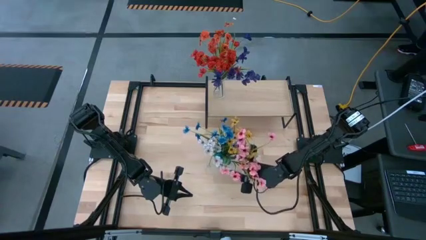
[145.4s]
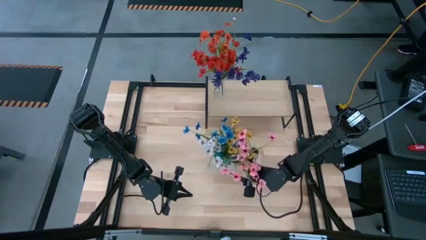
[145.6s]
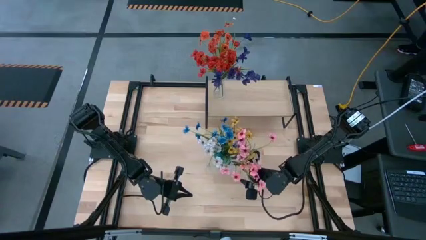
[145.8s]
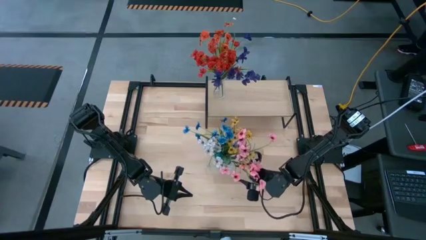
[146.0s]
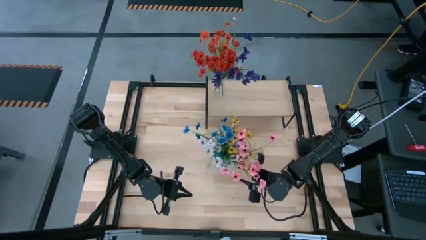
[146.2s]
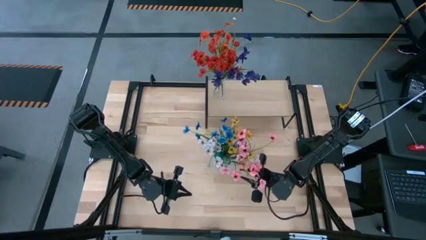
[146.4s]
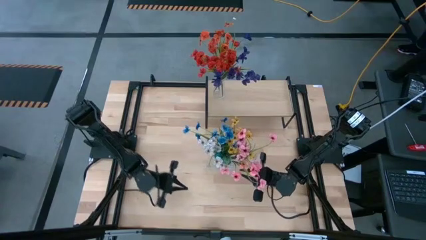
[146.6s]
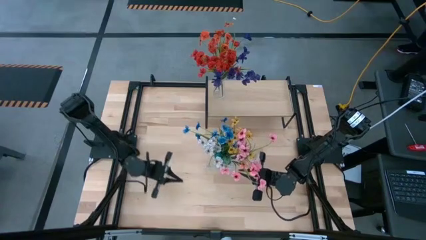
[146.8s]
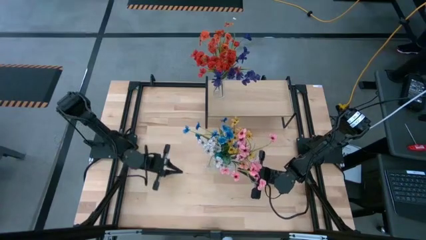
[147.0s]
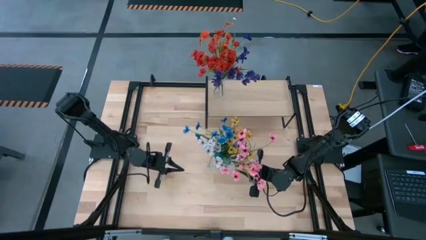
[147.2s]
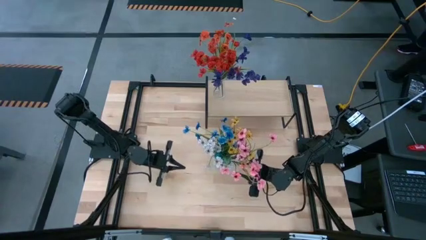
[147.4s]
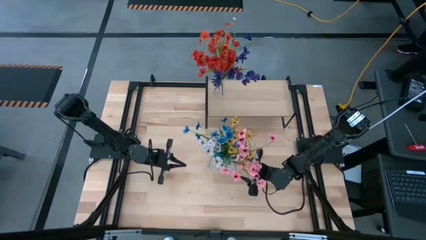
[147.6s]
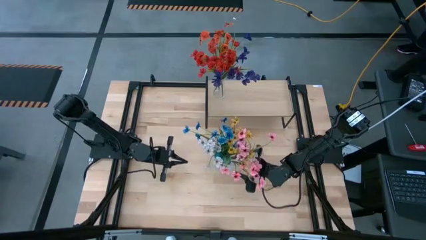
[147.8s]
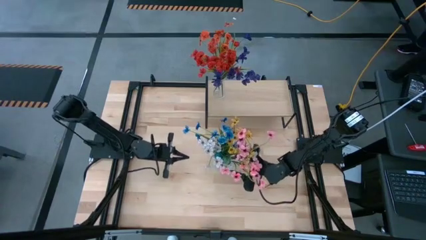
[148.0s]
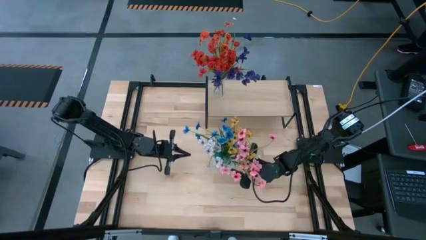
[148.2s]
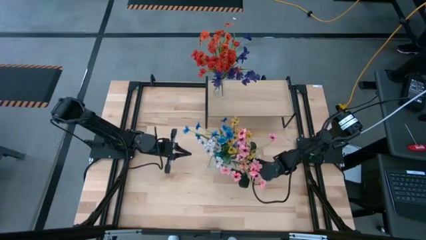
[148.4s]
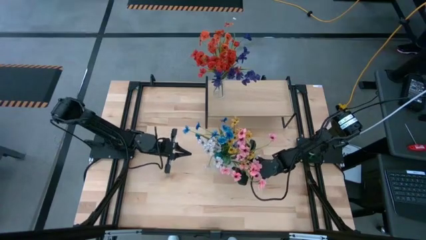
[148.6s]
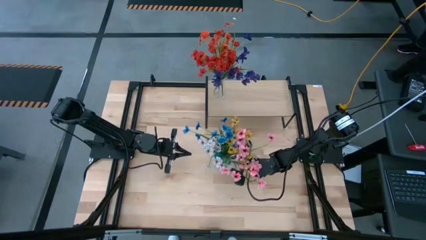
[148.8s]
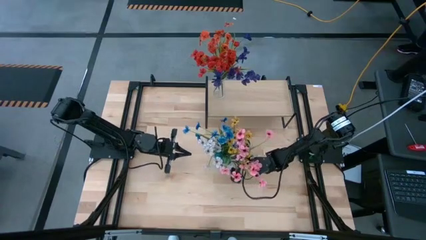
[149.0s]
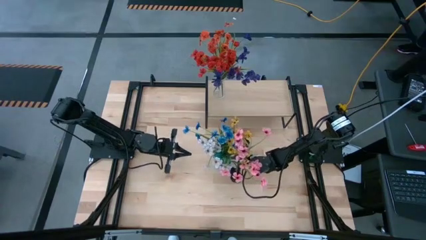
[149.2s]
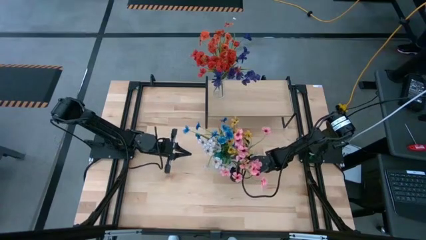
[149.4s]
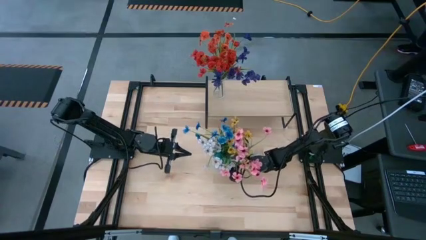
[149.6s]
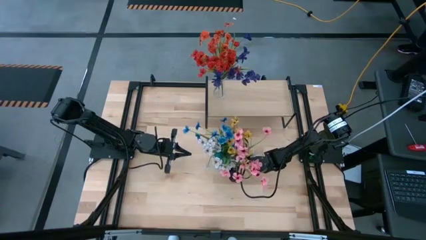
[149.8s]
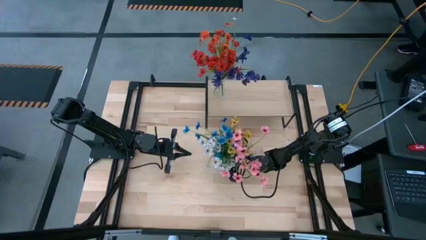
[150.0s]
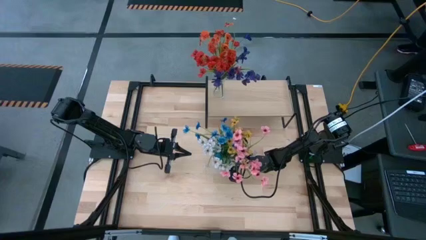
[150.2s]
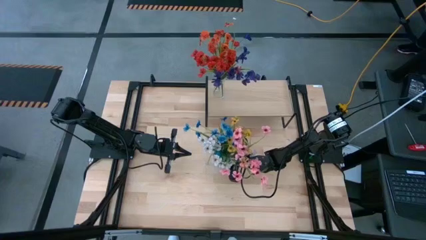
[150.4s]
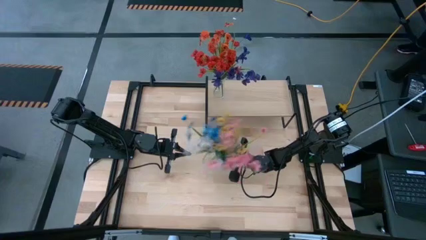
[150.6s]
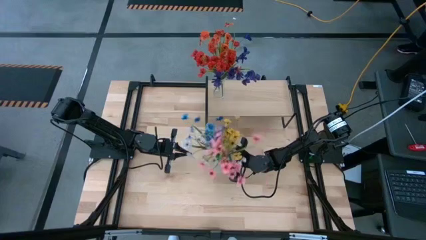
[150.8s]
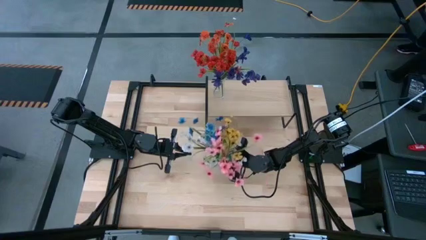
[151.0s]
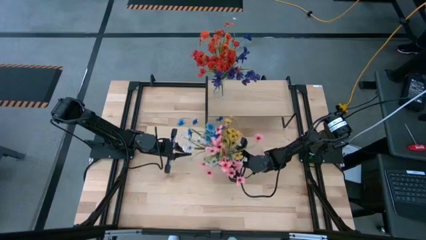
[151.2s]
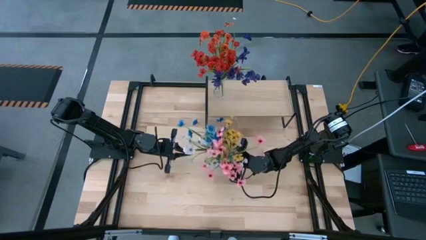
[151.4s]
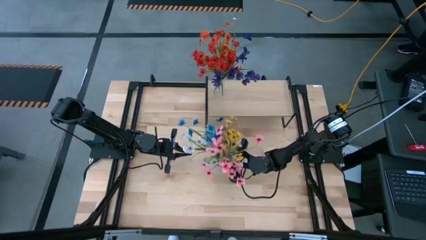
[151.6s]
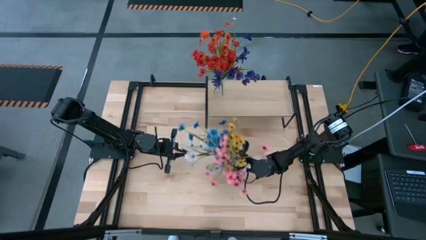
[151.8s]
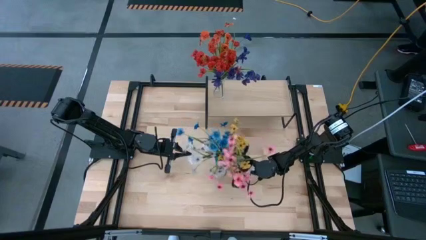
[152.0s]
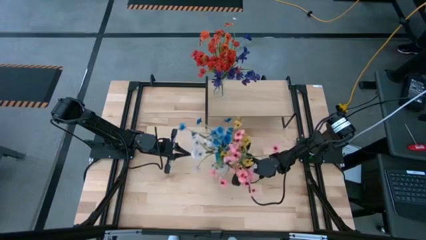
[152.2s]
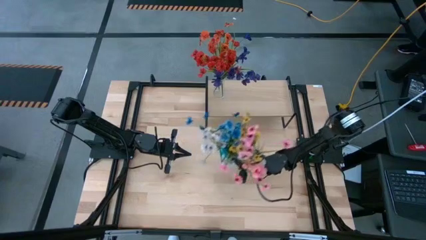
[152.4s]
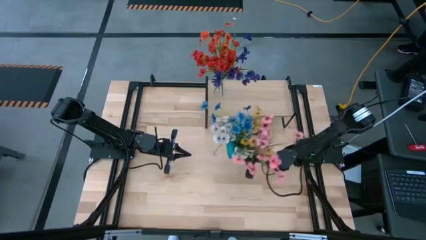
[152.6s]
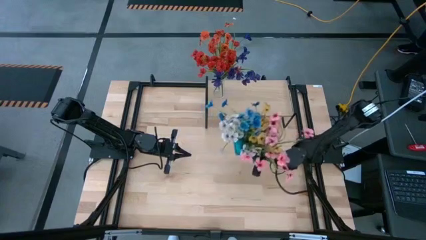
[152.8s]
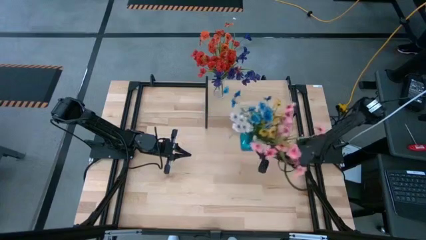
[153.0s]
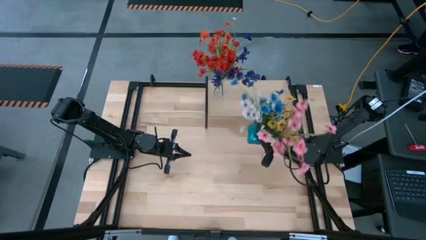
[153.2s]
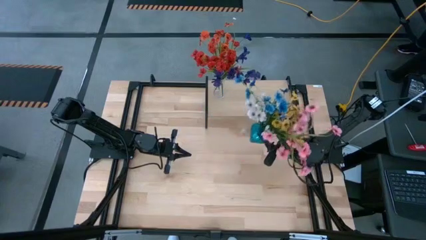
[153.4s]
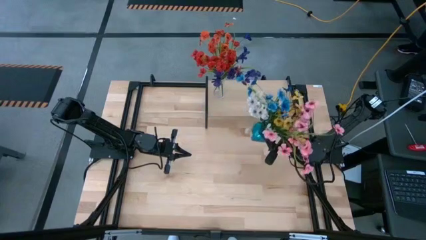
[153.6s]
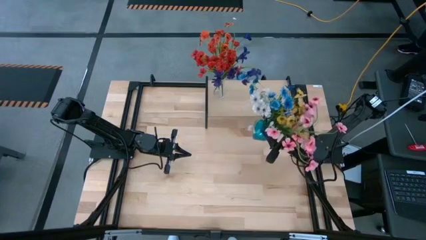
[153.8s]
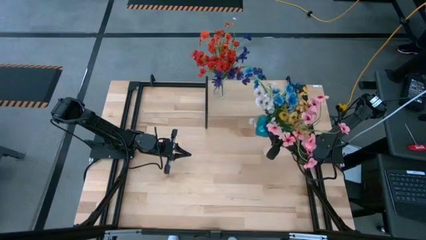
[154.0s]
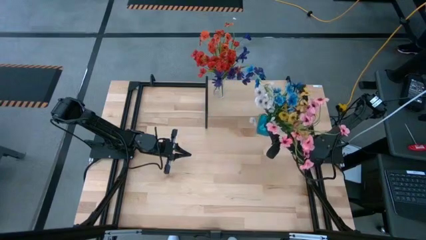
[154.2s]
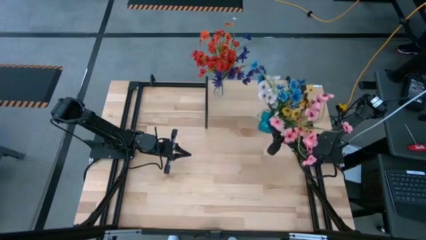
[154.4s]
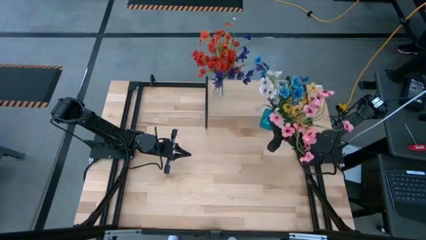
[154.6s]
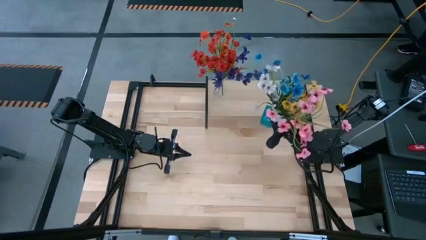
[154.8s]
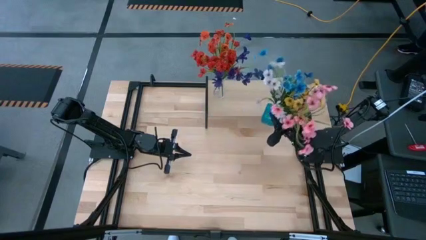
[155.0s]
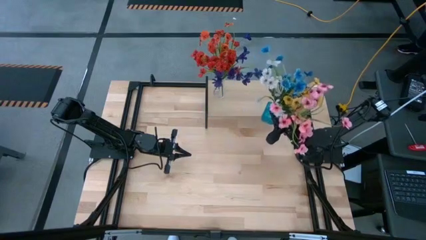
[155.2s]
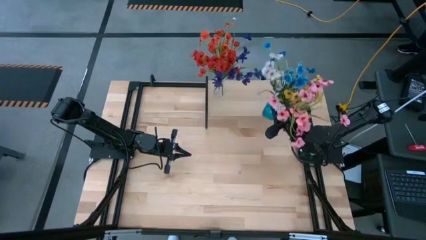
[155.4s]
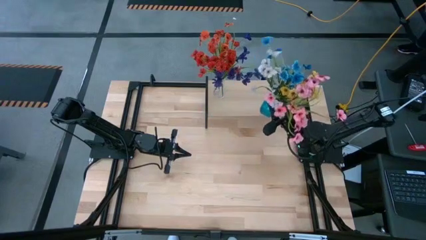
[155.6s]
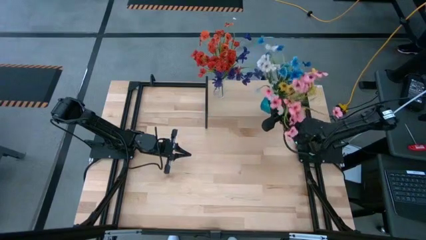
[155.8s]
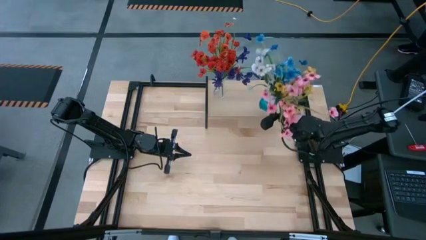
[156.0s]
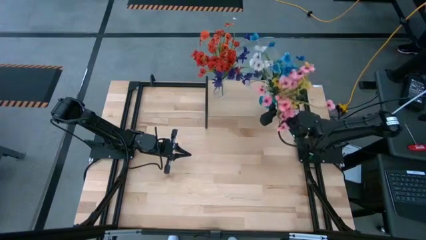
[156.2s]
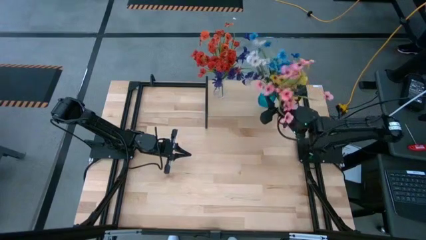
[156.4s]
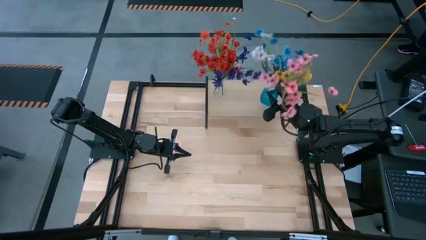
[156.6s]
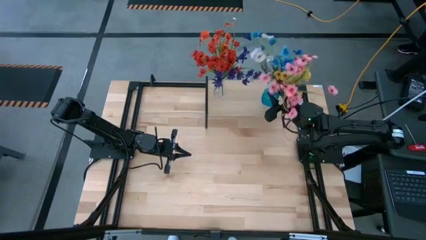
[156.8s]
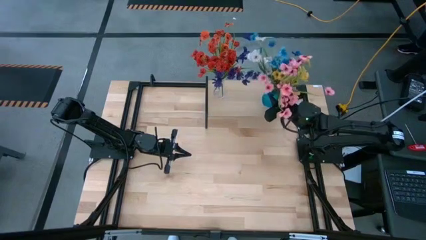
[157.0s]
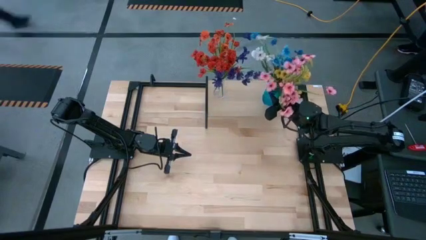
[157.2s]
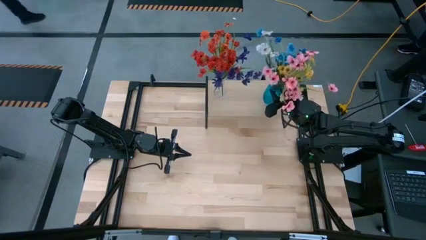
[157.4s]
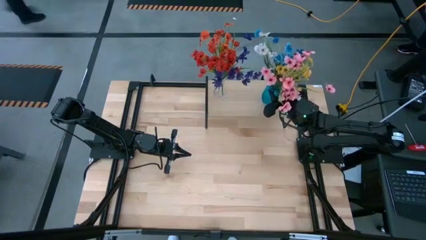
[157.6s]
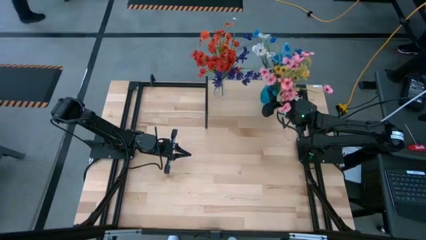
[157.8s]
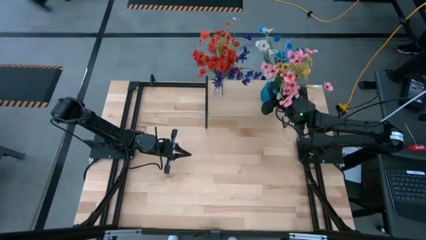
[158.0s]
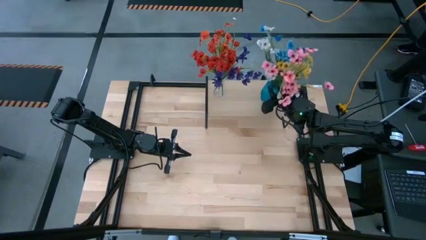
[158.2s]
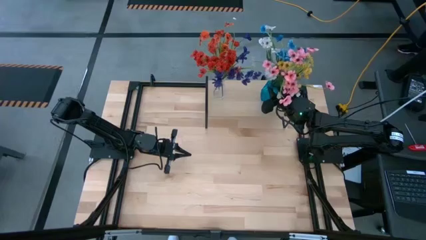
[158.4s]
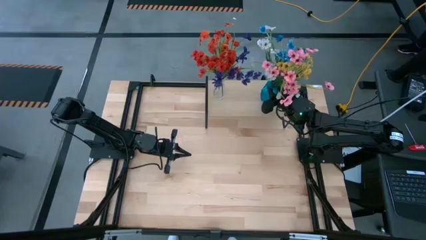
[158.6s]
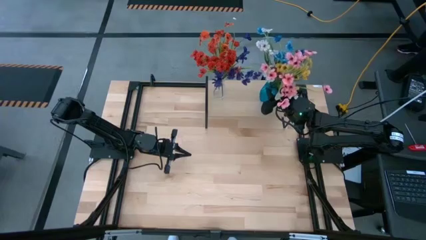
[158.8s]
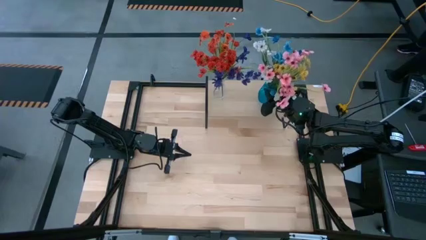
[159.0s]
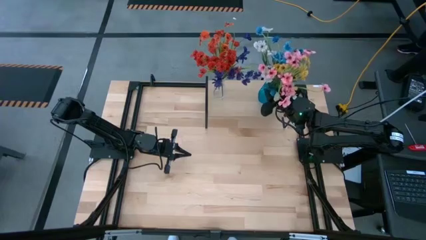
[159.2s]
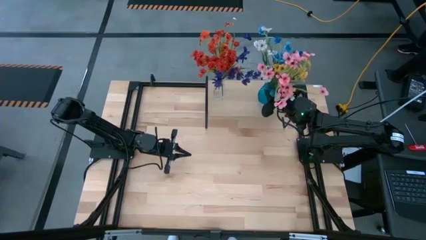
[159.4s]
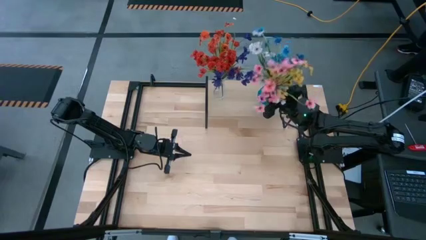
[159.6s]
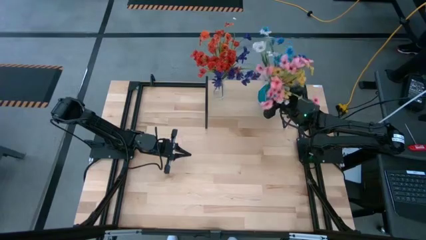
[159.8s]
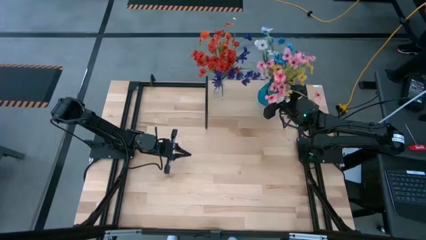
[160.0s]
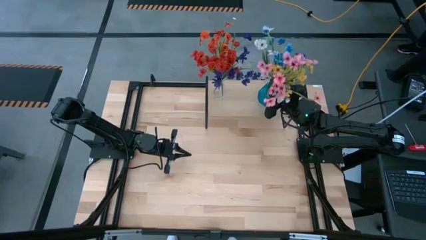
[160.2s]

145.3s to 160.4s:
Task: Pick and place flowers into a vace then onto a shelf
Put the blue vase with the flowers on the shelf
